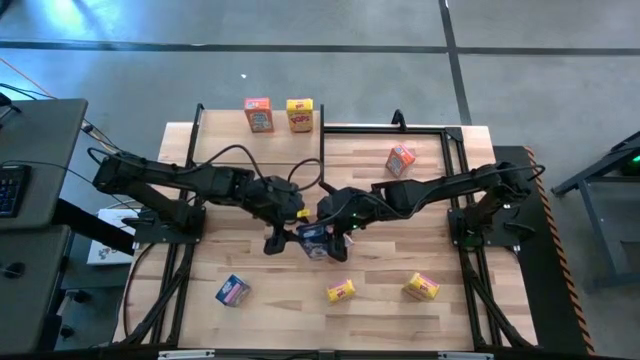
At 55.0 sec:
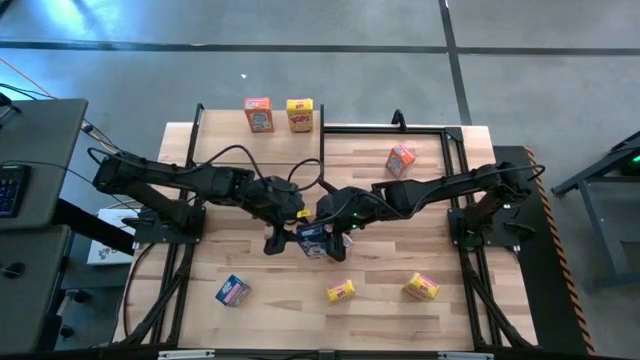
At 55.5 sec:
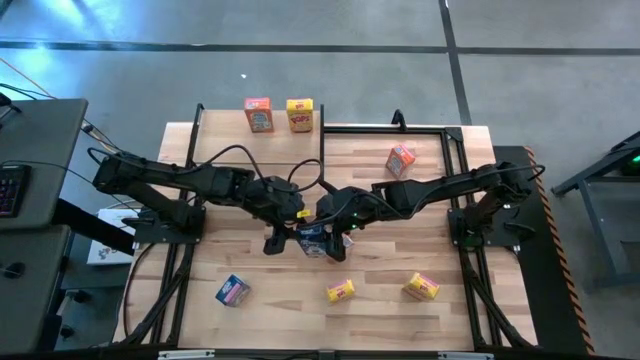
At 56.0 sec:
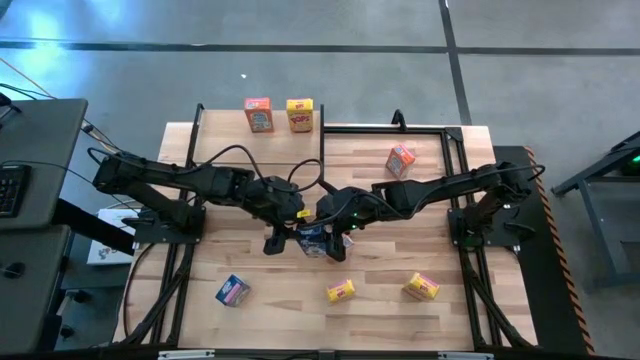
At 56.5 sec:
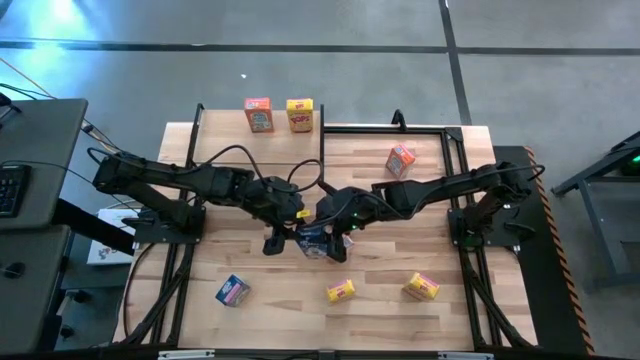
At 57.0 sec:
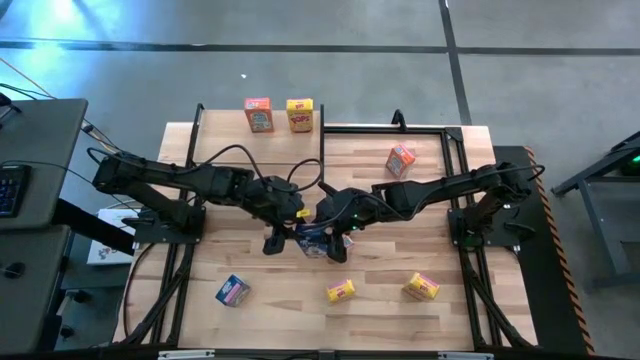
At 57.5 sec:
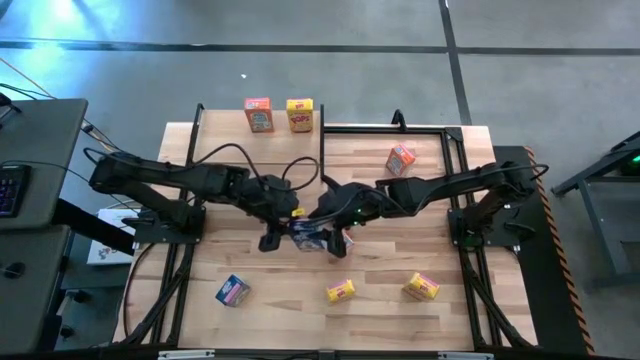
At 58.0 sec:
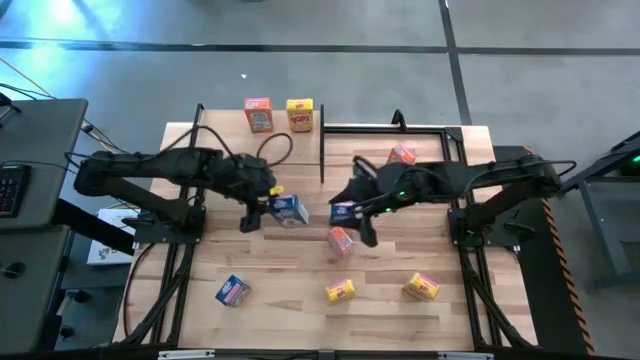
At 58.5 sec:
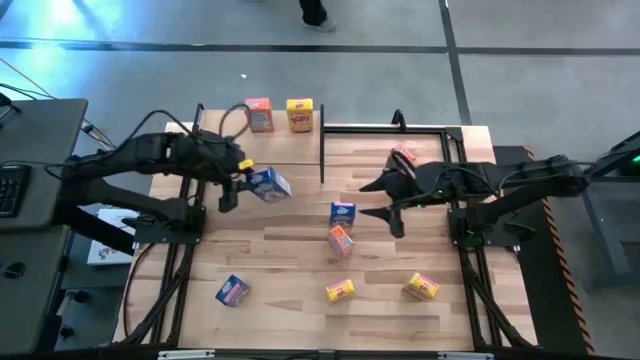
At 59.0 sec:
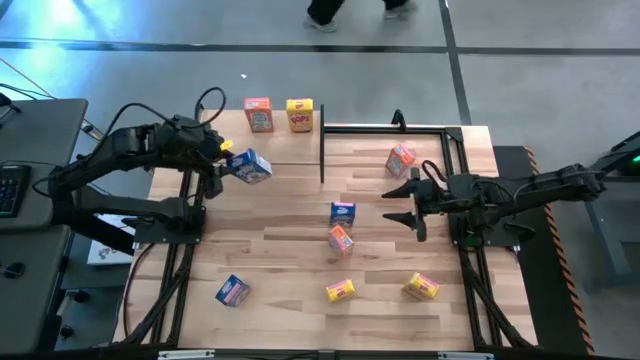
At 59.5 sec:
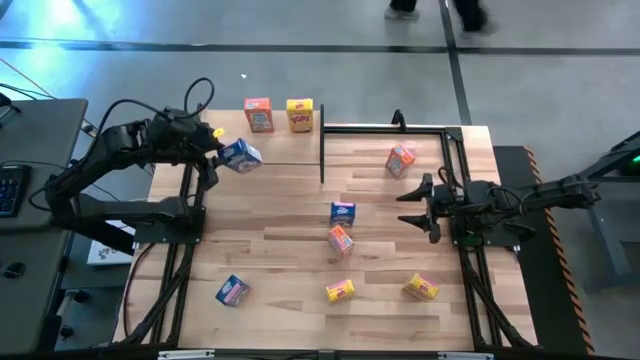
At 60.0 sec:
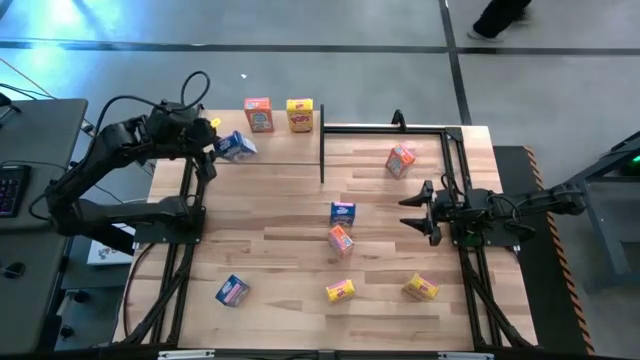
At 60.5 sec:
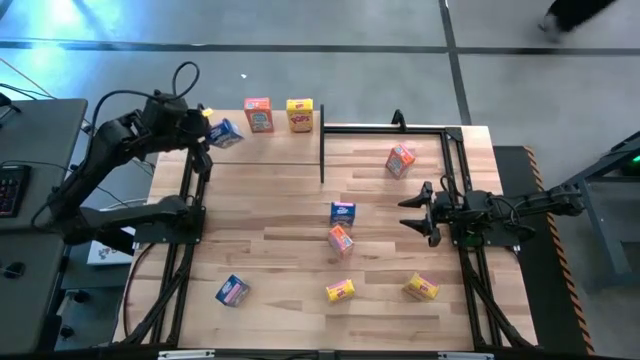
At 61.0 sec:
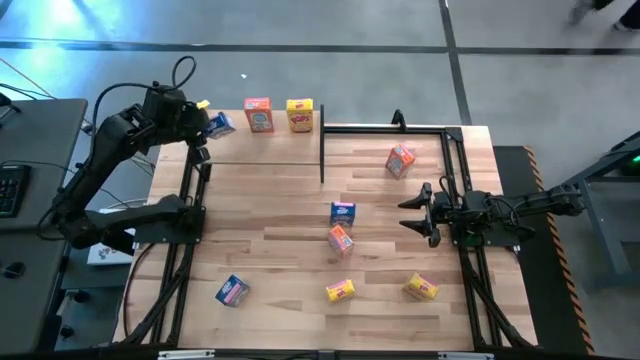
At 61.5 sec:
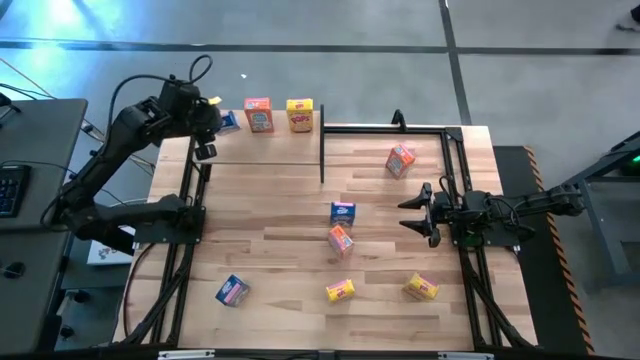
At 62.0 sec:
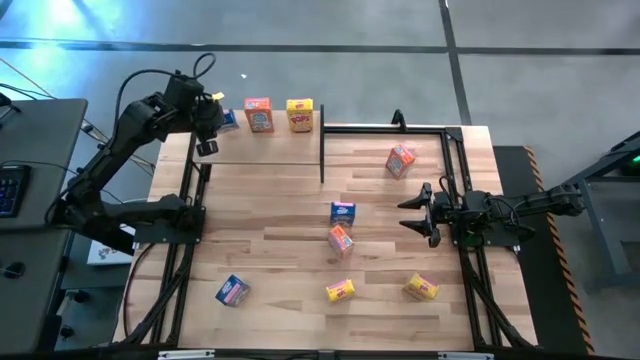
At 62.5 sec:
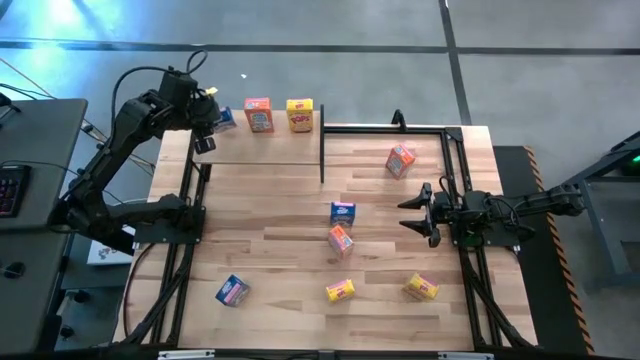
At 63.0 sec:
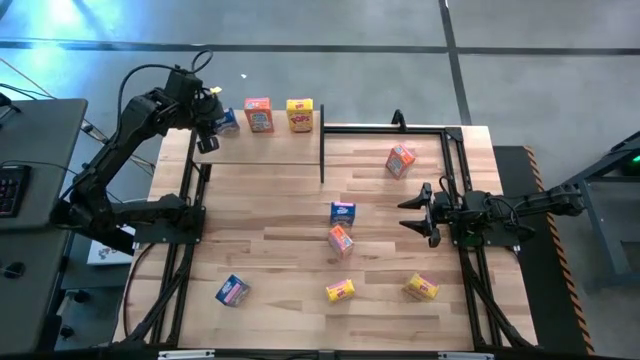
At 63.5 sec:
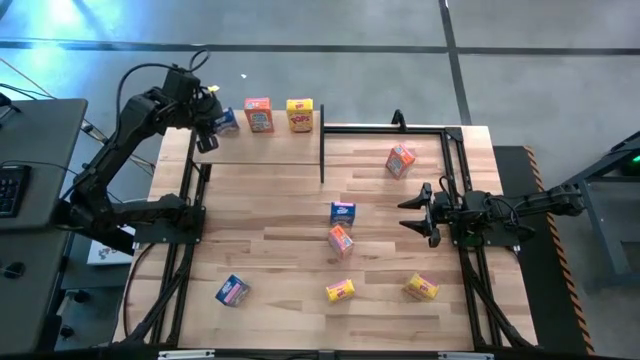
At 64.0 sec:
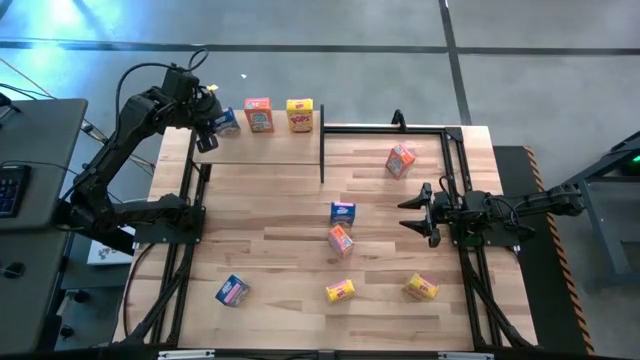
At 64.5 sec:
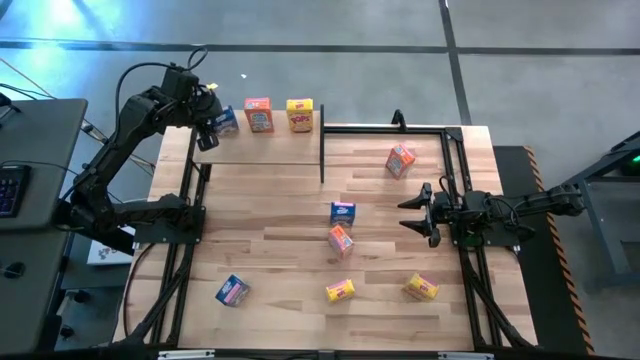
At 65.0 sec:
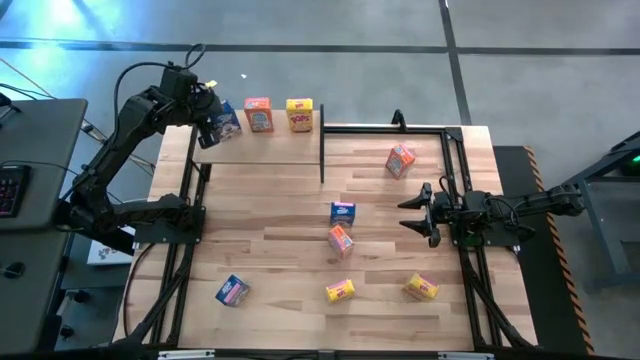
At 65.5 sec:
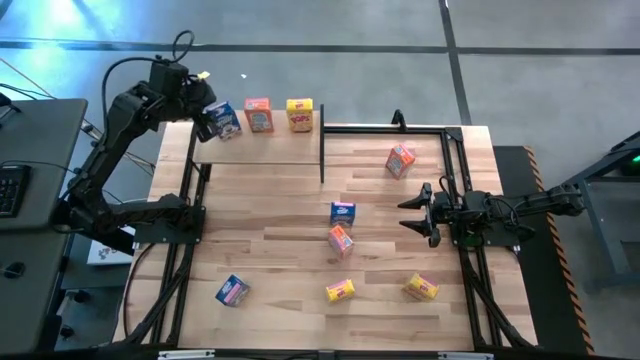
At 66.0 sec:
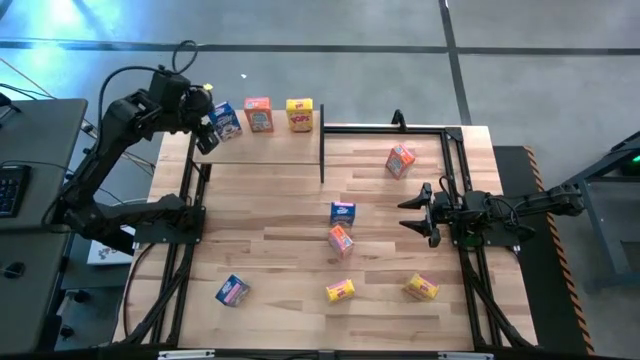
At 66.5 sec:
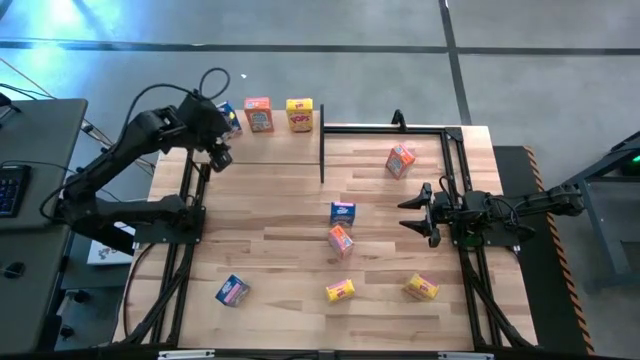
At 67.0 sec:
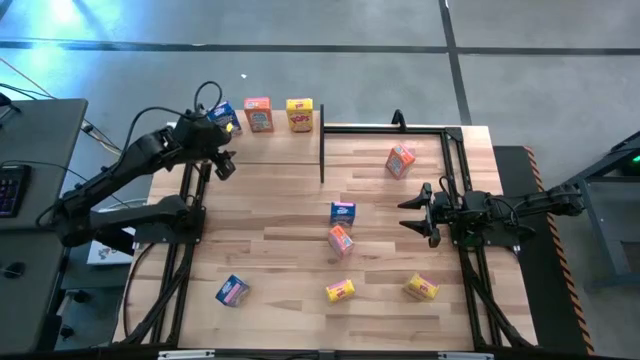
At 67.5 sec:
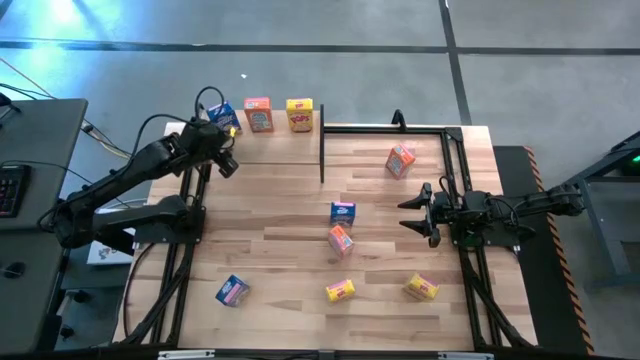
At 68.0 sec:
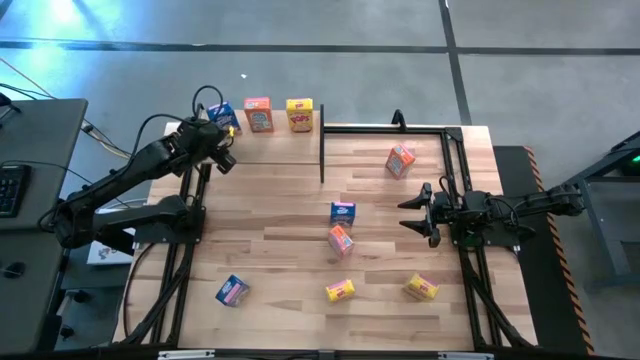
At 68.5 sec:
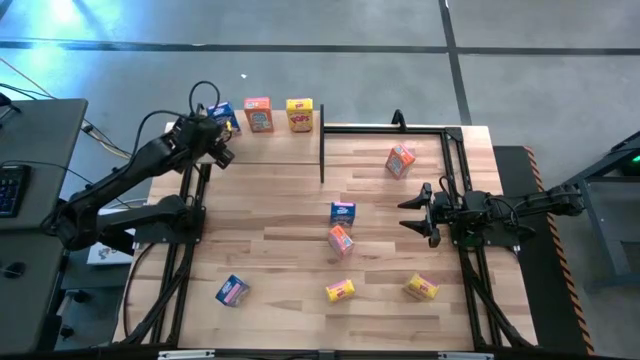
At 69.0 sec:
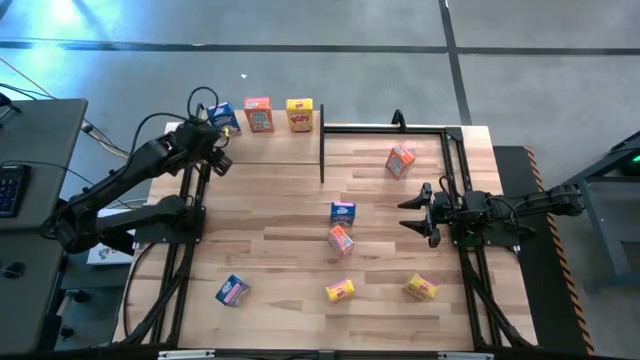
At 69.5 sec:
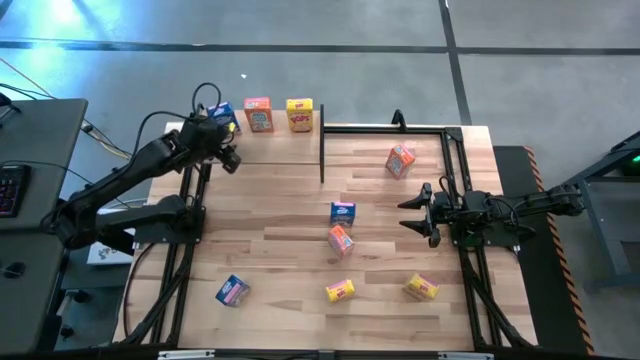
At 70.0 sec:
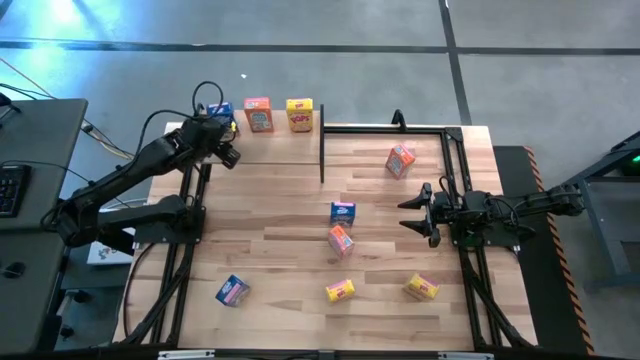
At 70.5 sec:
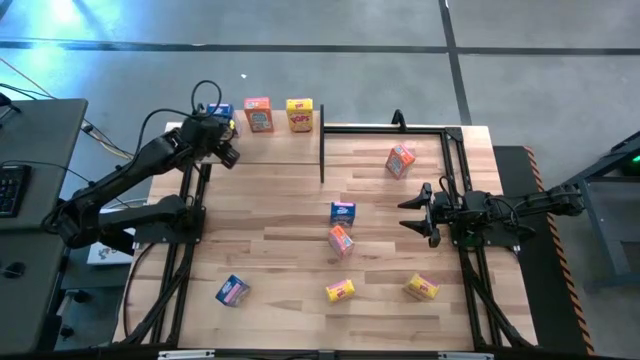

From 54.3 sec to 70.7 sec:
Task: Stack cereal on shelf
Put the right blue cereal box on the shelf

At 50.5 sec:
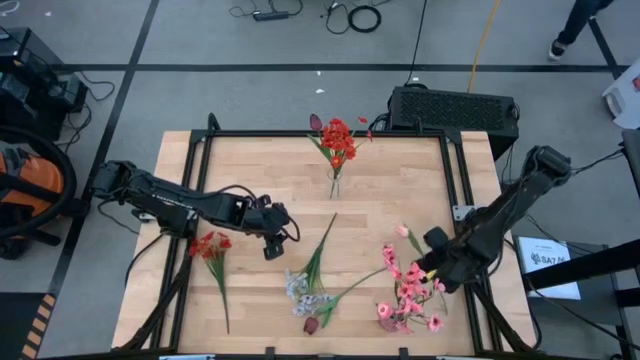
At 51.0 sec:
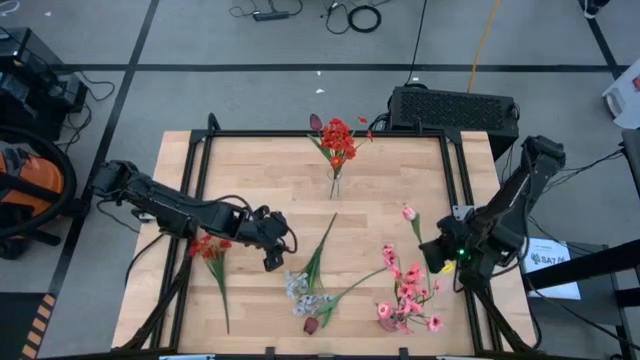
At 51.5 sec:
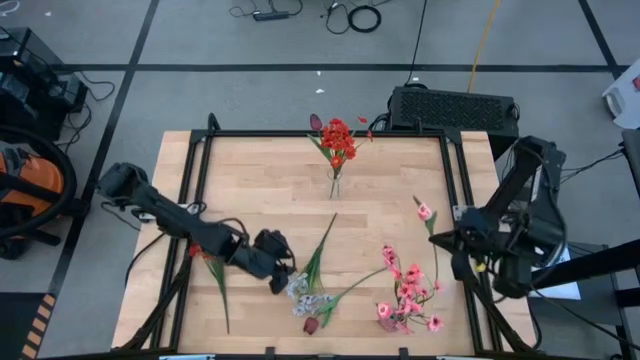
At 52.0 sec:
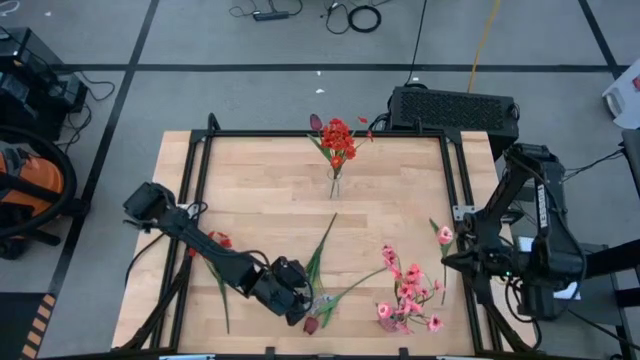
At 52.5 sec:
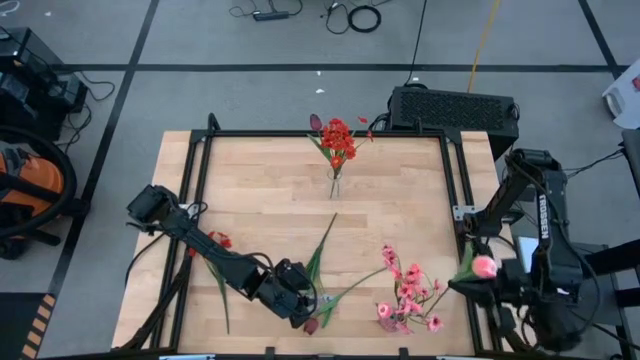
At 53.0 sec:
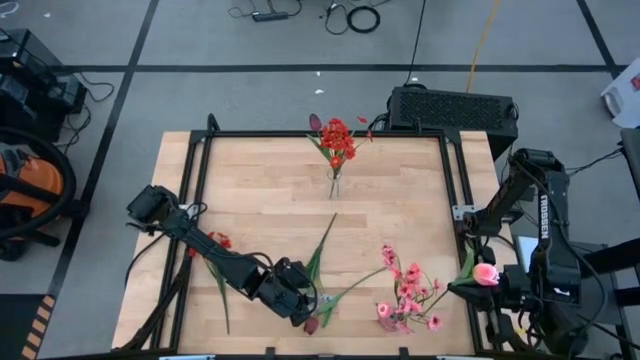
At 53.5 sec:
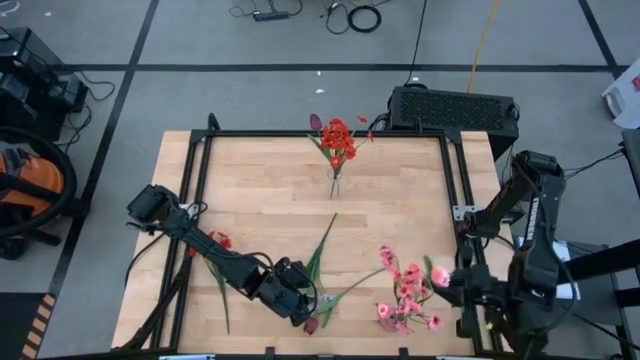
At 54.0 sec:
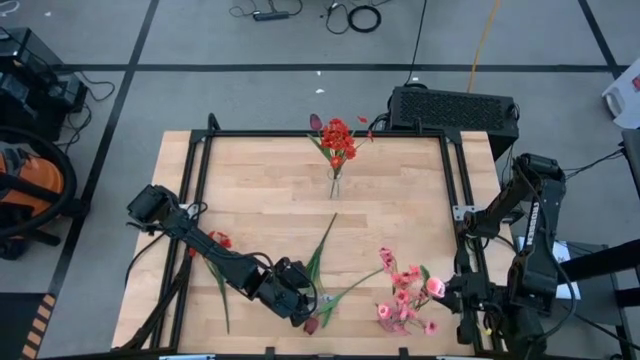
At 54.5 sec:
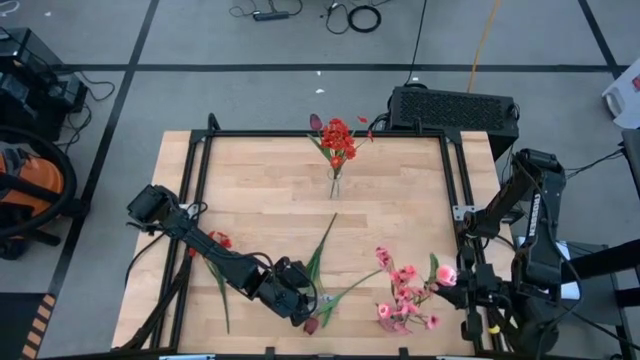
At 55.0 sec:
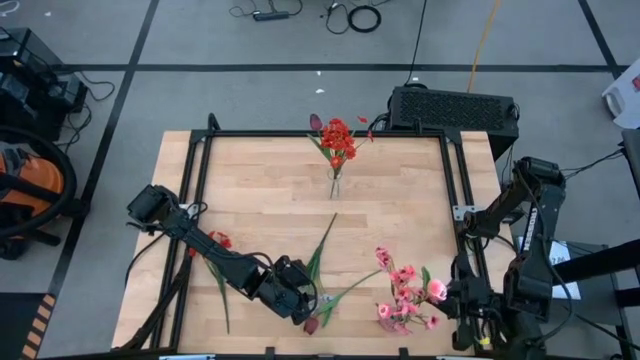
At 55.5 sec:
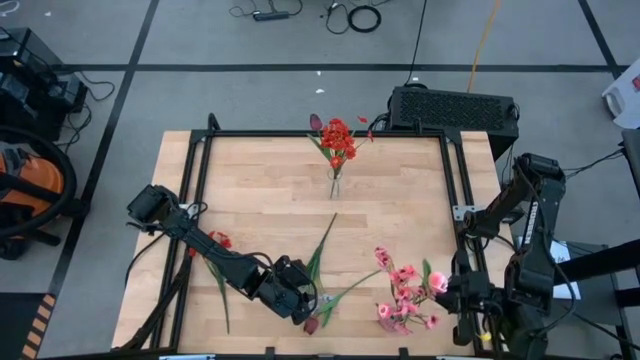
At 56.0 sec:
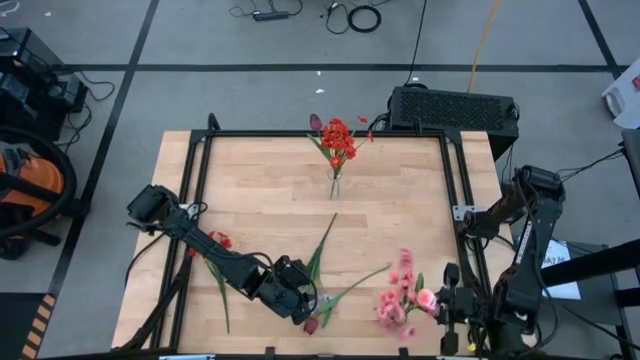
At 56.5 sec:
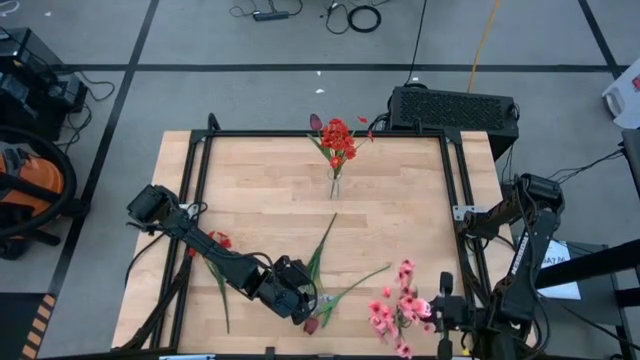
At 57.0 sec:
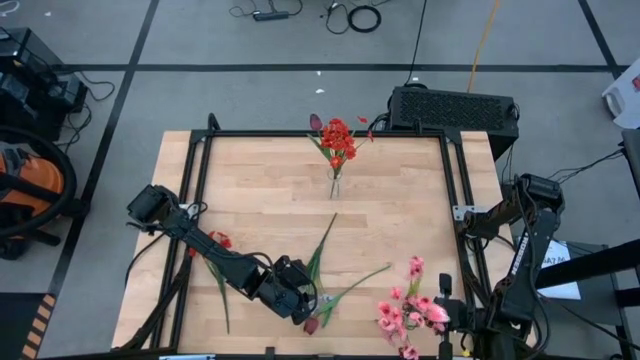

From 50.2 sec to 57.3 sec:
Task: Sort flowers into vase by color
Put the pink flower into the purple vase
